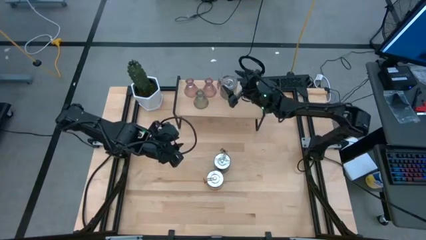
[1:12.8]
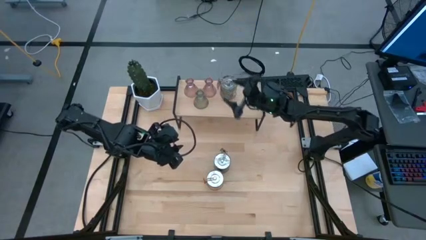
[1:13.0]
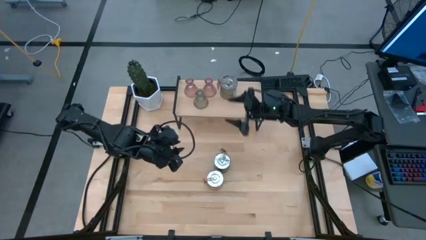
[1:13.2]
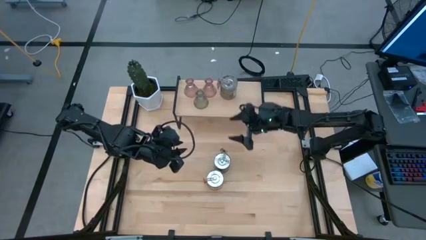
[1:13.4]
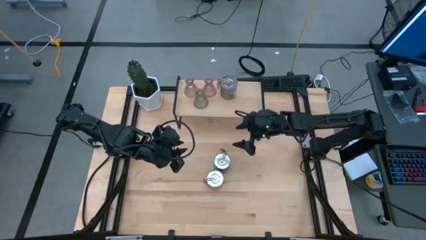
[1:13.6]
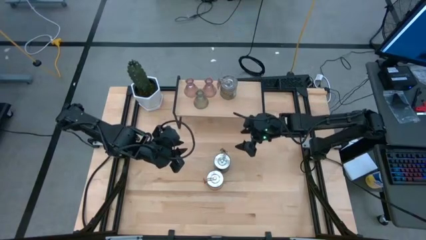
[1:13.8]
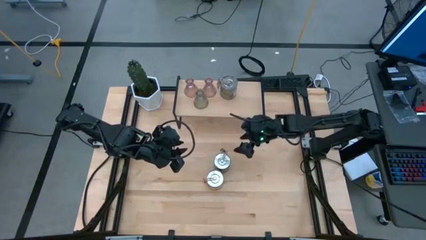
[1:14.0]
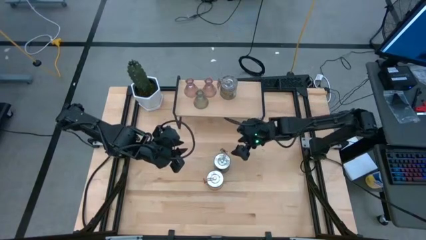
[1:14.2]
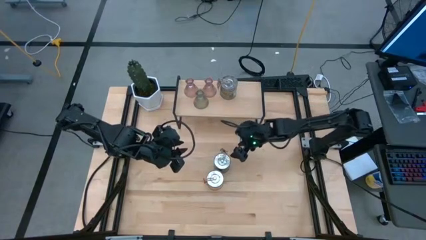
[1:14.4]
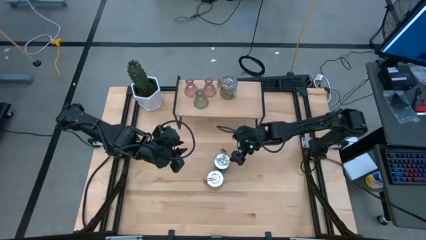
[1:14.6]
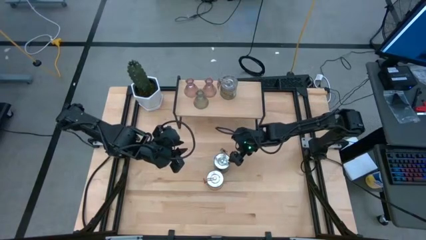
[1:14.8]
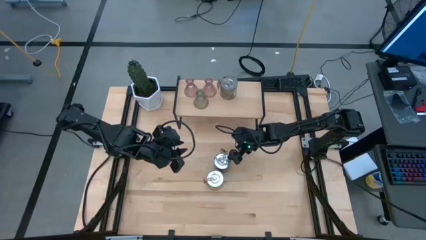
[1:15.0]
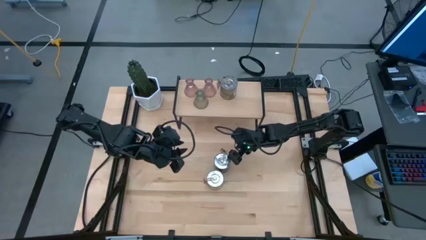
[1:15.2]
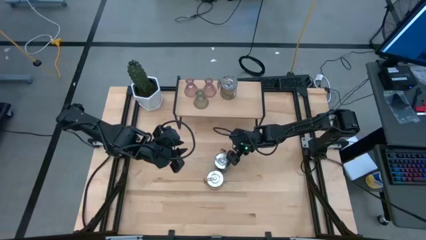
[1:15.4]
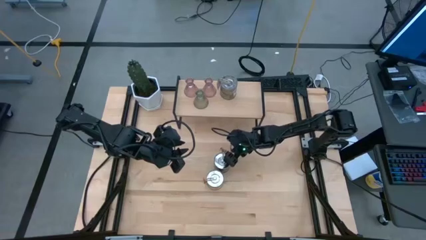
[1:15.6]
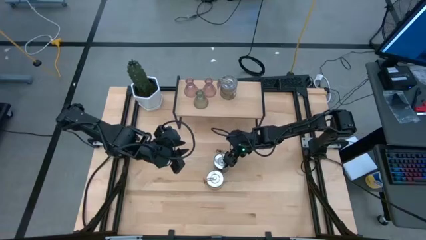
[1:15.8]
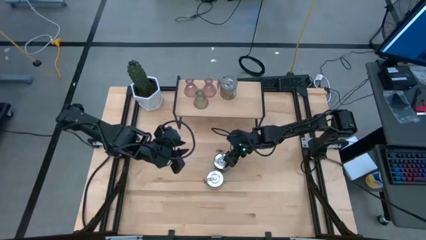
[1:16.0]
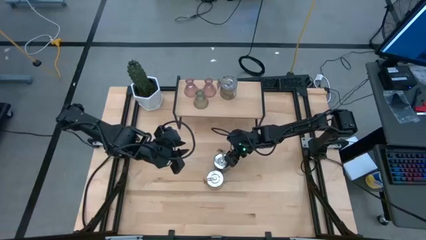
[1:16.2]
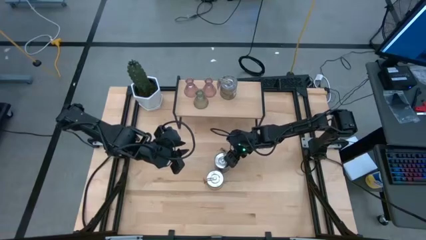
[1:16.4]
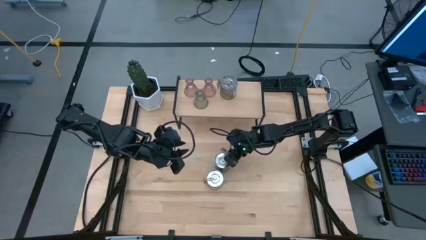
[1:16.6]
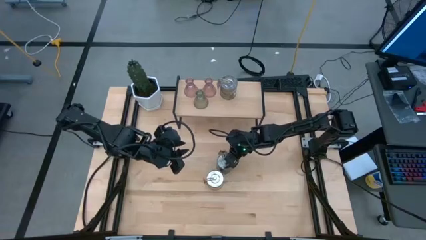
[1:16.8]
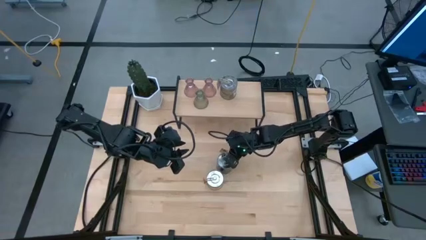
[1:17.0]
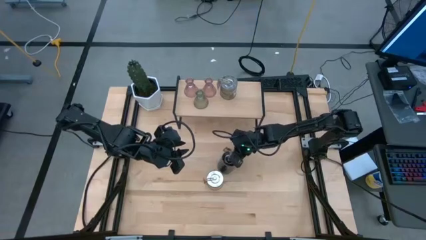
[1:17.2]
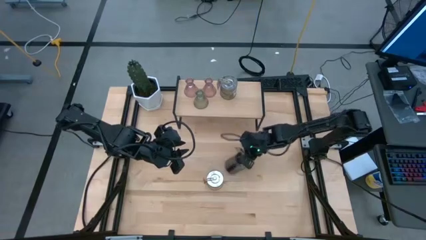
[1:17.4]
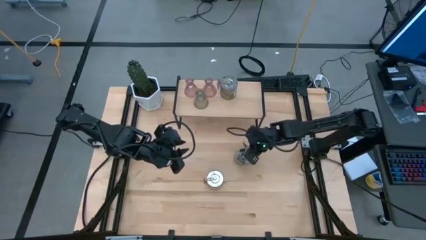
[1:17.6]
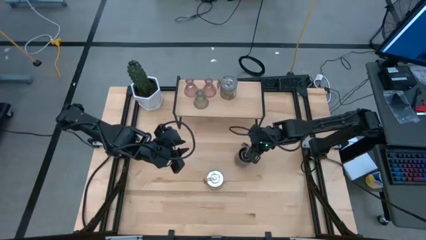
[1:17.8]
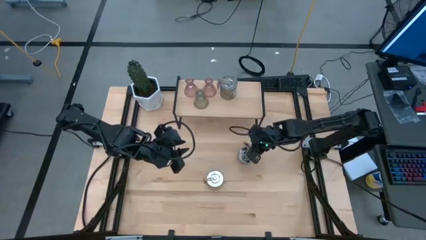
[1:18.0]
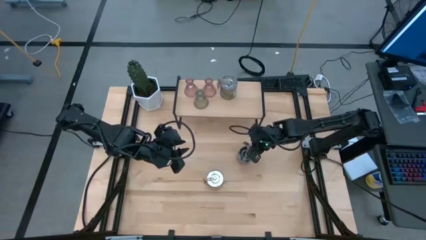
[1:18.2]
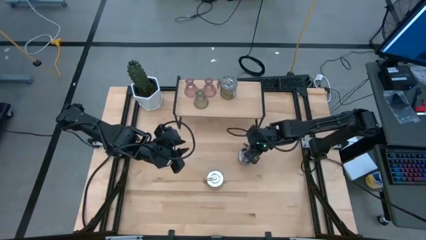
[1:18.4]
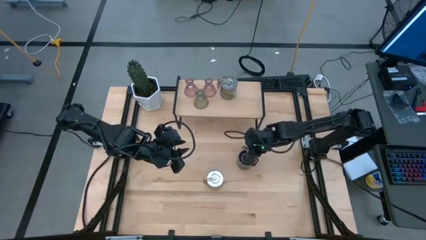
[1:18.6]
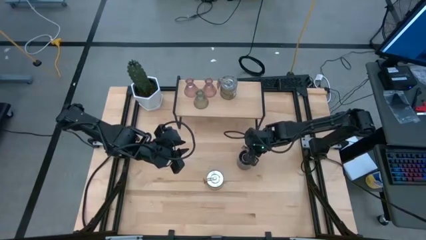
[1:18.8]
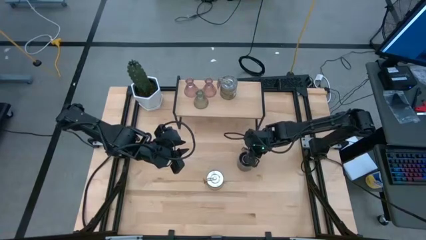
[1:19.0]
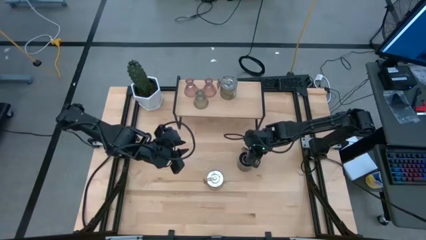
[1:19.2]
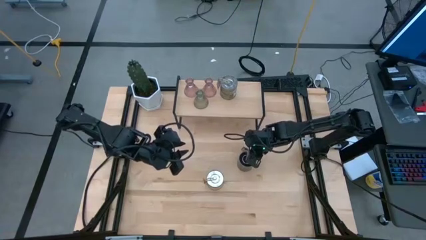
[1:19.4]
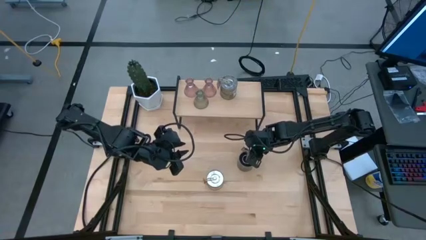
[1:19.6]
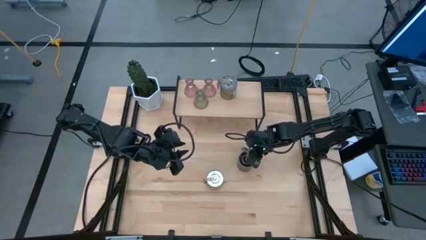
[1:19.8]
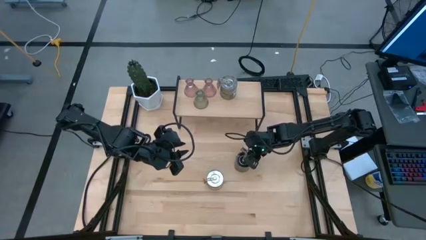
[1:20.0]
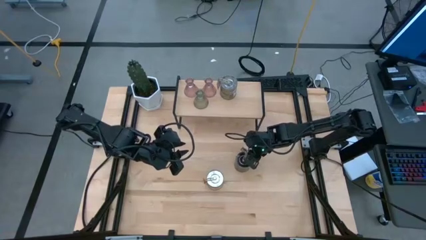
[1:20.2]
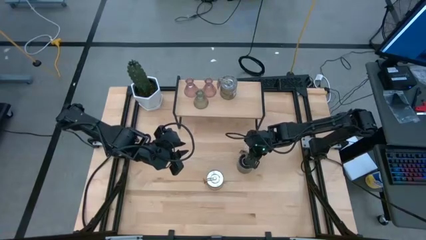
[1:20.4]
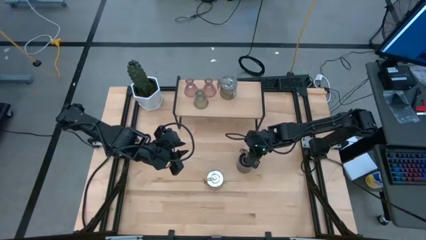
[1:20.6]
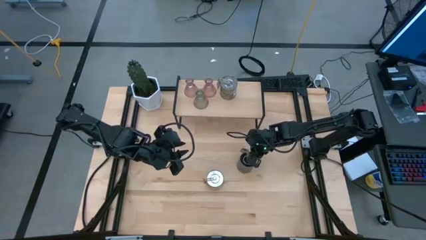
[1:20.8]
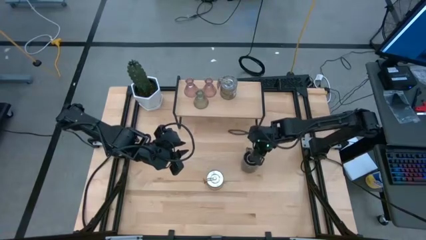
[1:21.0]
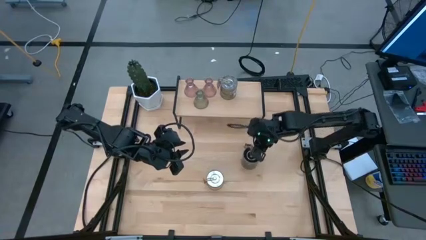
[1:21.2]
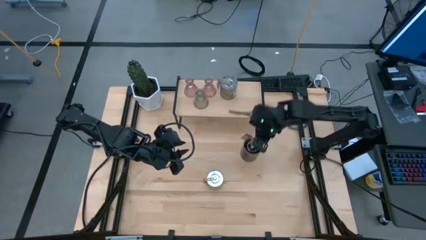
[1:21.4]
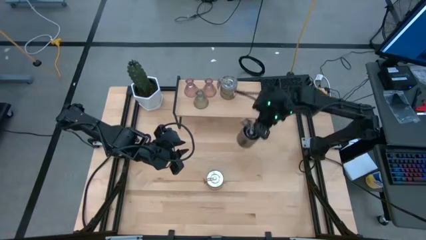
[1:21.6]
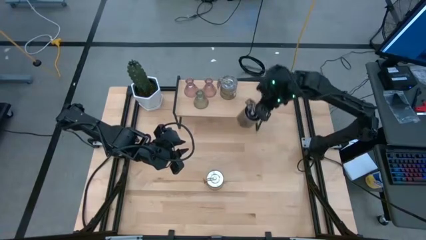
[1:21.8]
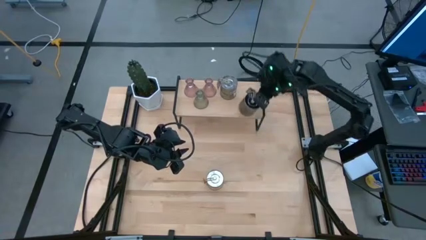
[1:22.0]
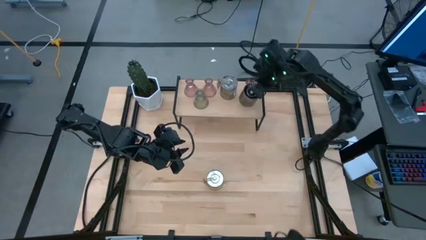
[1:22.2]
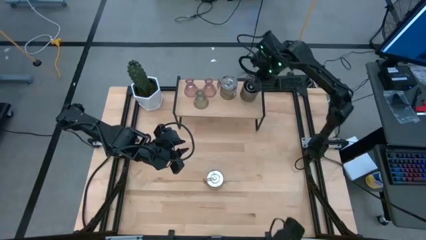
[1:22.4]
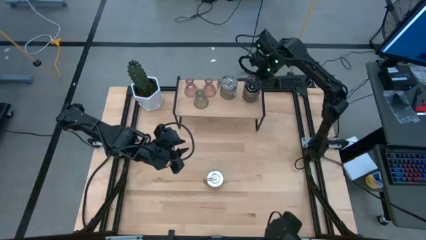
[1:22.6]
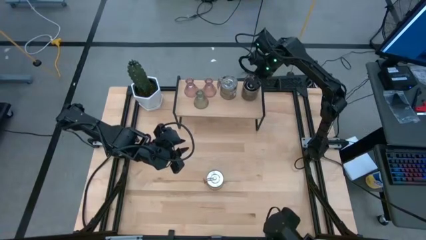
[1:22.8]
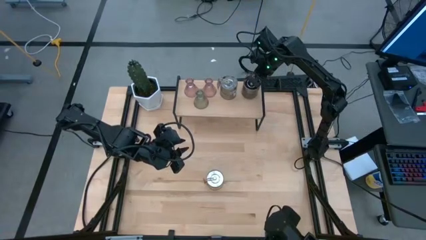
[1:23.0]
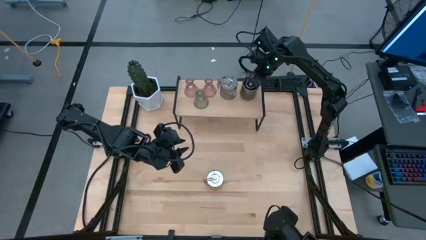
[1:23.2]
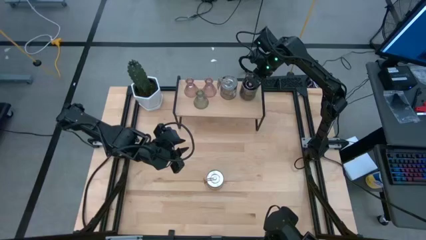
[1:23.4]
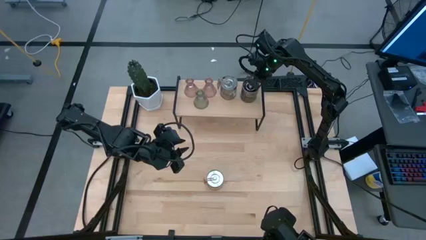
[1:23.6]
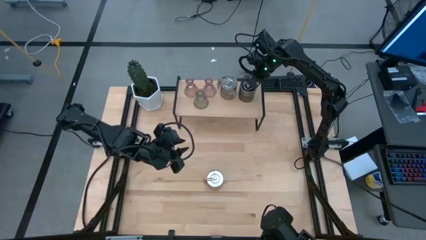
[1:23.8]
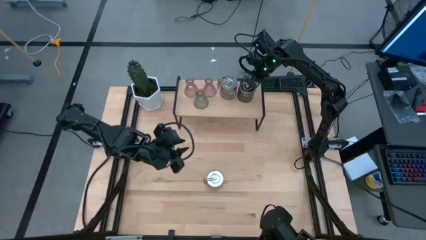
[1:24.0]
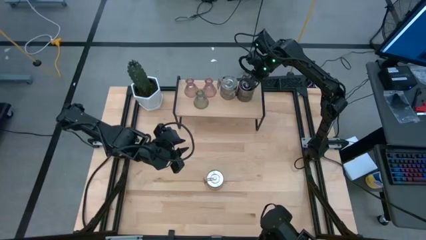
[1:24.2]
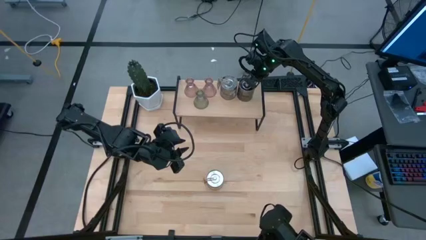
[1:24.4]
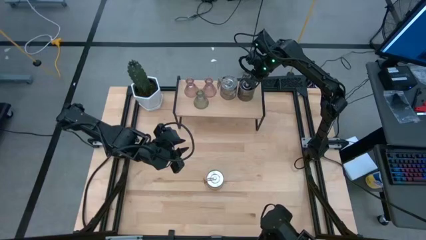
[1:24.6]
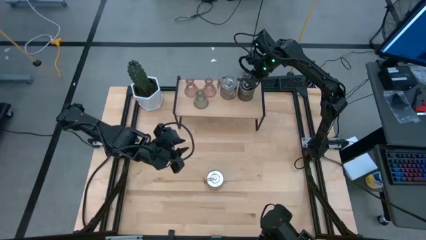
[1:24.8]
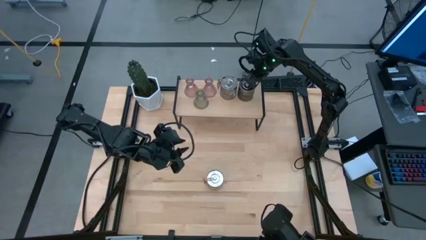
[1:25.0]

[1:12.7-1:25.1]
Task: Pick & Place candle stick holders
Put the brown scented candle on the shelf

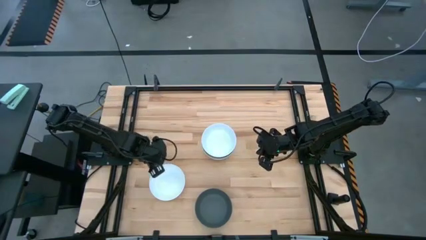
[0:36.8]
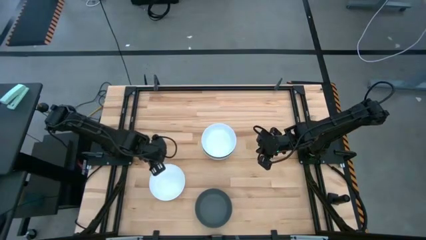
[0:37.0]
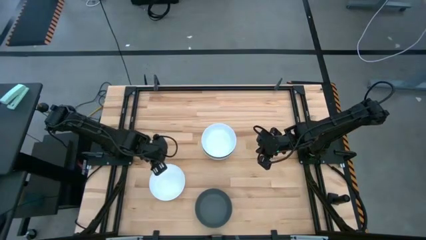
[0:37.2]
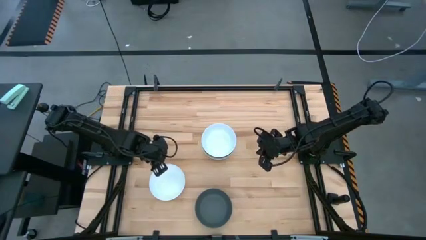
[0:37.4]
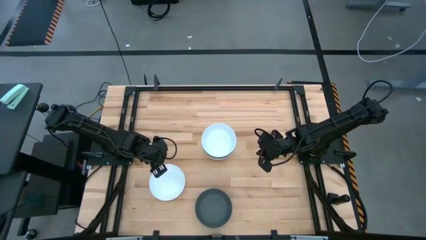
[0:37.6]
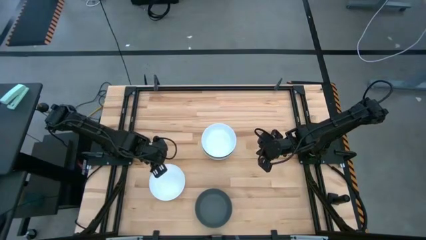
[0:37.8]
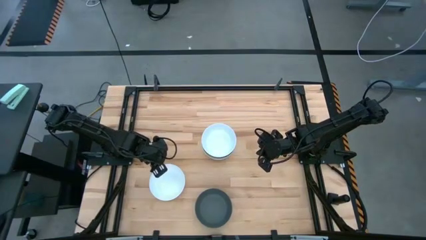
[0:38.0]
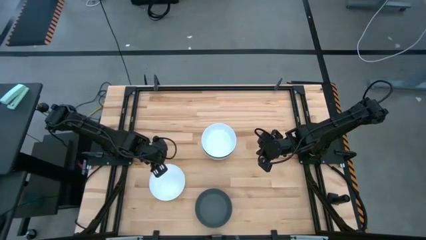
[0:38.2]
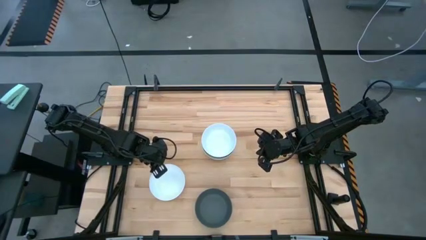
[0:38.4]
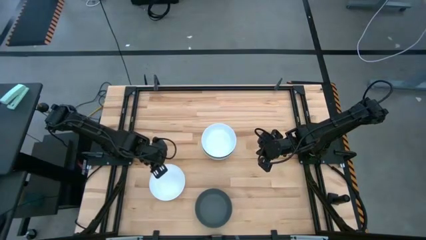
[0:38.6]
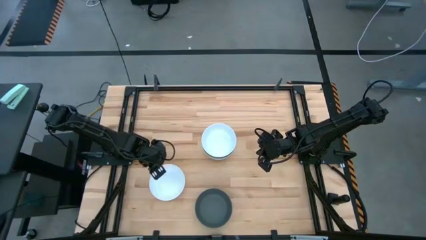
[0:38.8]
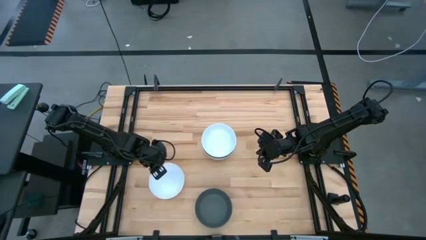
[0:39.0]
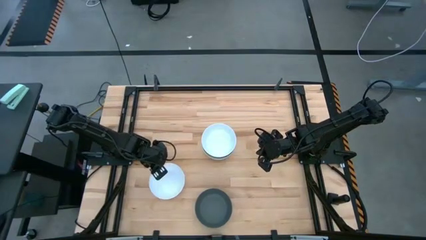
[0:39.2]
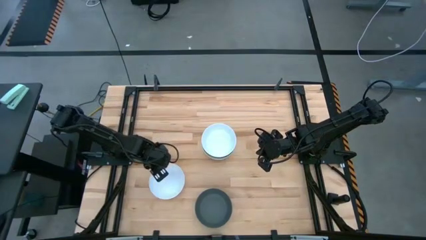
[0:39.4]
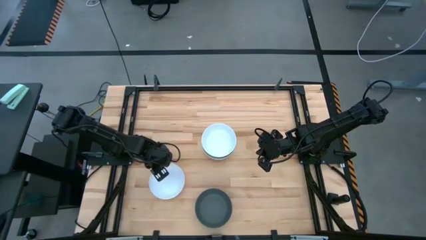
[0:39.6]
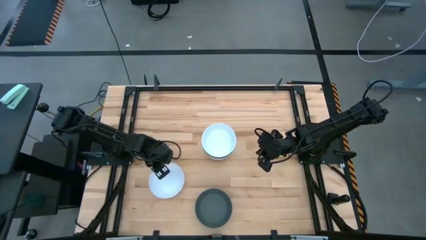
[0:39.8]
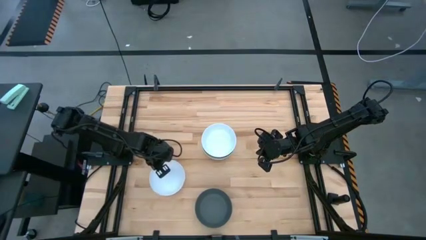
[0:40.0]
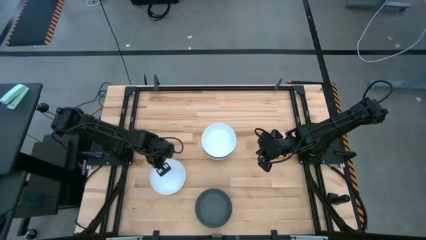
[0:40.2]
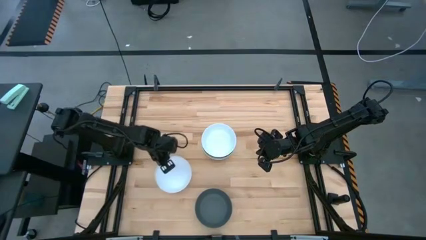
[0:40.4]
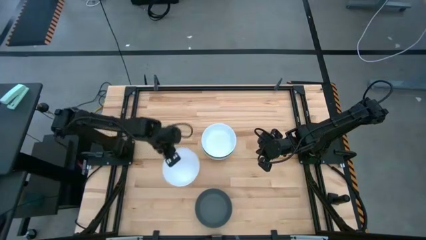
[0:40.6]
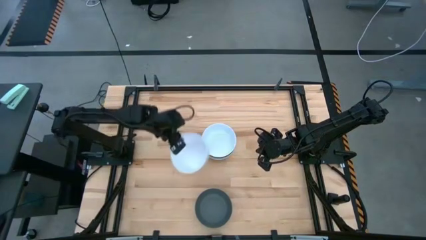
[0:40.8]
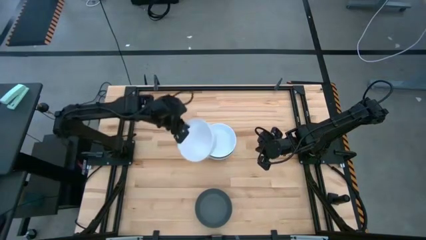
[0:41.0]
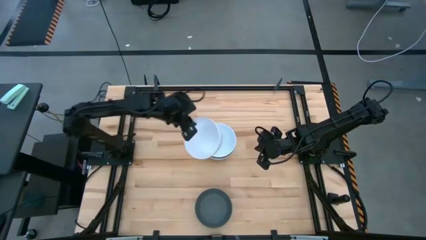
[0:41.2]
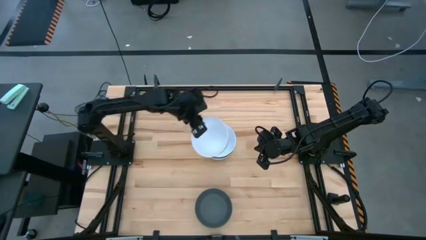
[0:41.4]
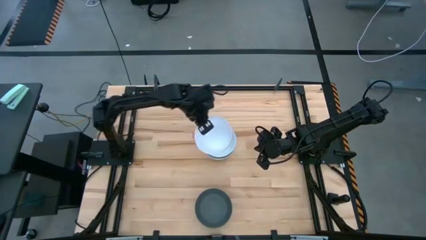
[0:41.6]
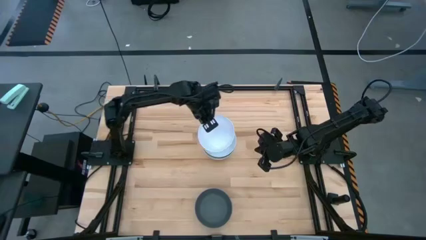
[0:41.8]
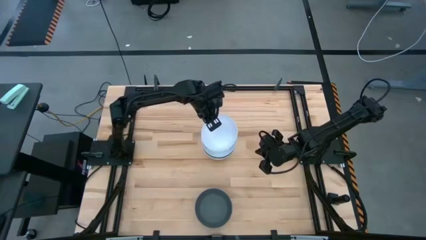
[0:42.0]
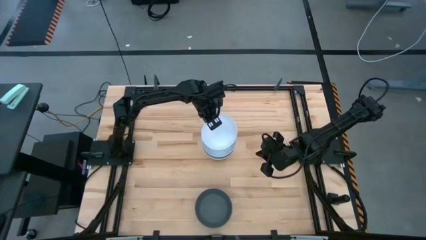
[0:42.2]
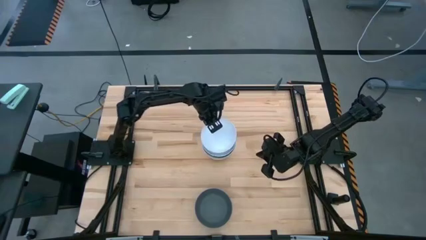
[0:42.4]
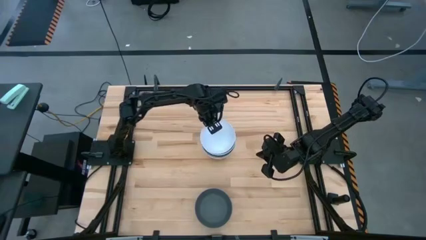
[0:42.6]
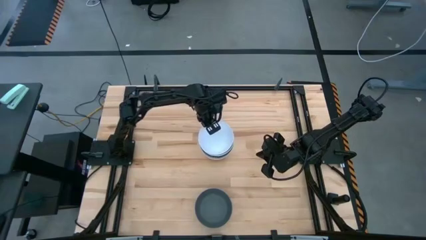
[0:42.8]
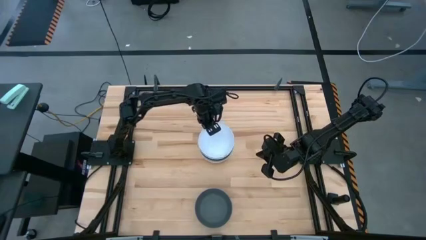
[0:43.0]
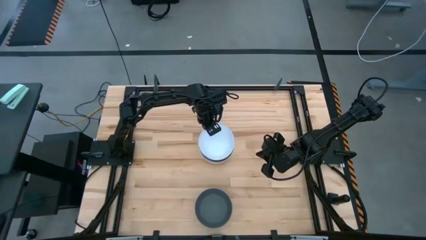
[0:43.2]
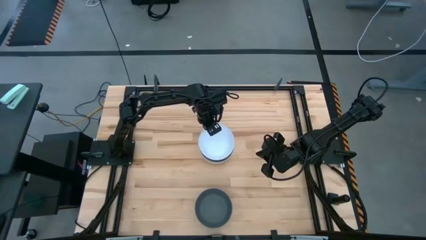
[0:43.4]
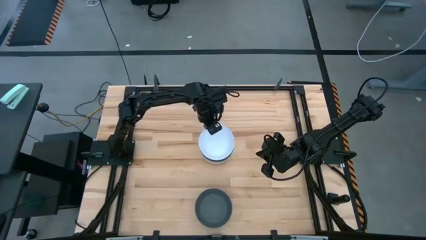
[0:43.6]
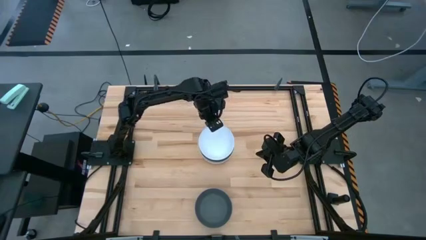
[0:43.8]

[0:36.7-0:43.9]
Task: Nest bowls inside each other
Stack the bottom white bowl on top of the top white bowl
